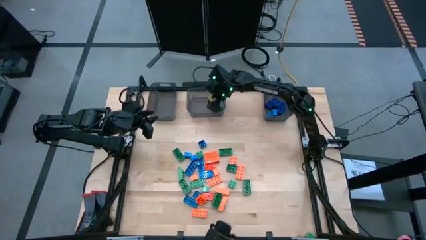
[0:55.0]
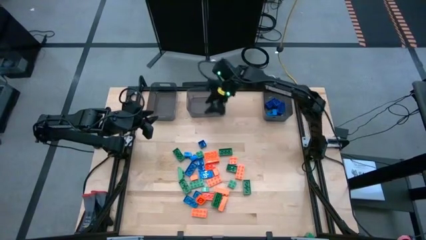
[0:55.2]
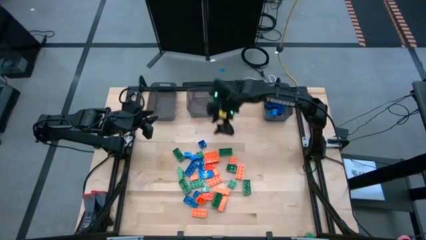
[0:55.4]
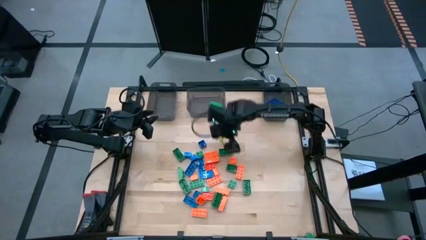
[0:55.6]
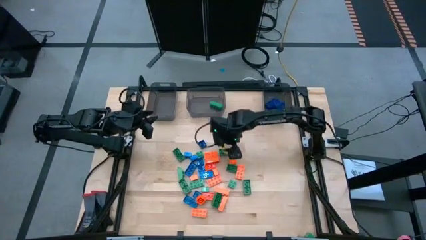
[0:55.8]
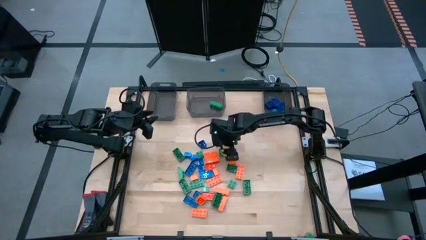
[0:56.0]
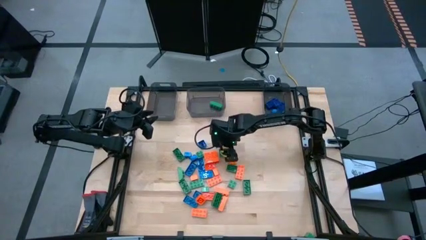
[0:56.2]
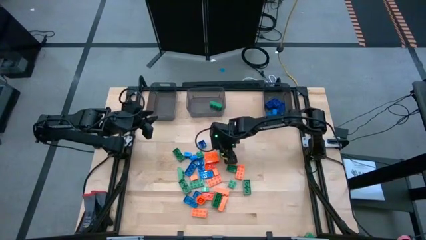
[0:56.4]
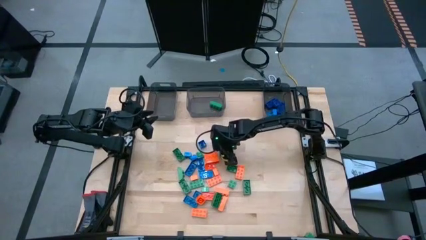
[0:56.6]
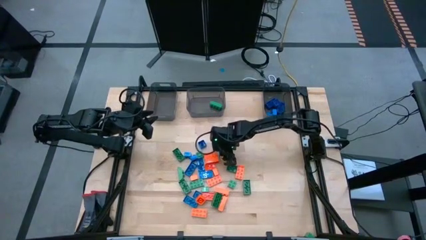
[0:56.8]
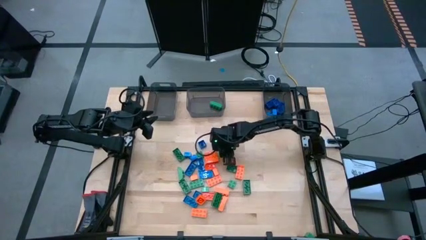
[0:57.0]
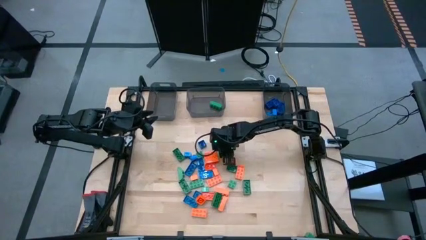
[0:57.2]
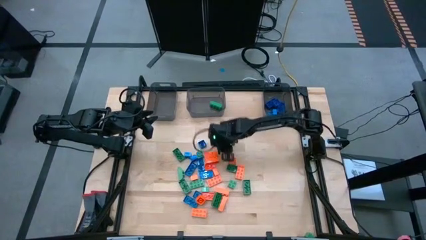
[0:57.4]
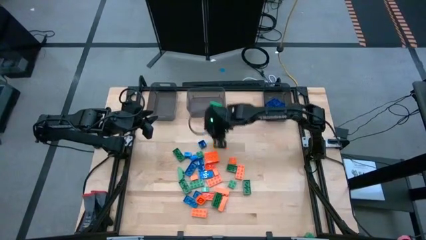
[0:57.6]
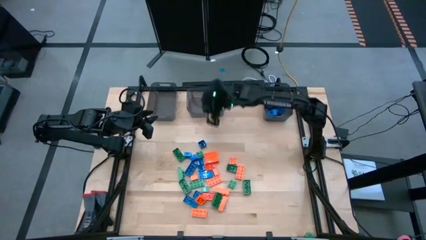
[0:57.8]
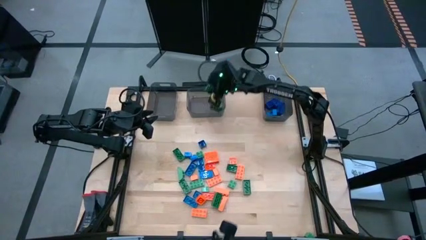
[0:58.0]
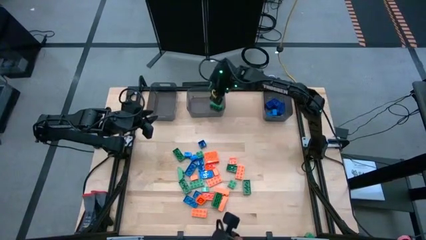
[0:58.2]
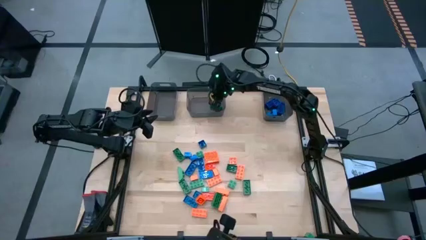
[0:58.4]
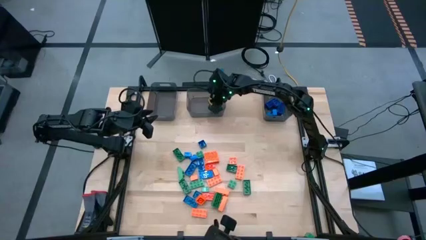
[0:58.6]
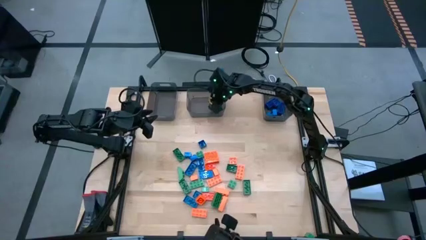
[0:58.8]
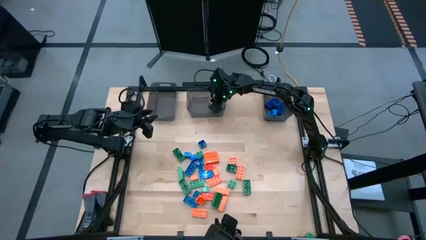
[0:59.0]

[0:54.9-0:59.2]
Task: Sort blocks
Put the green piece into the middle black bin

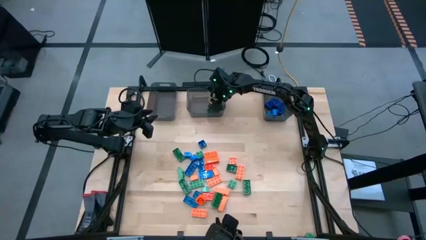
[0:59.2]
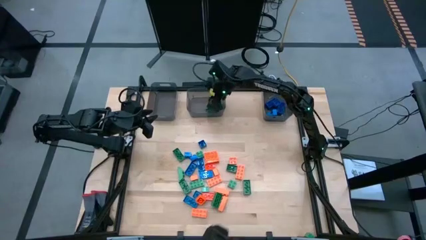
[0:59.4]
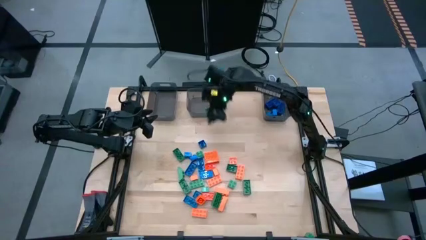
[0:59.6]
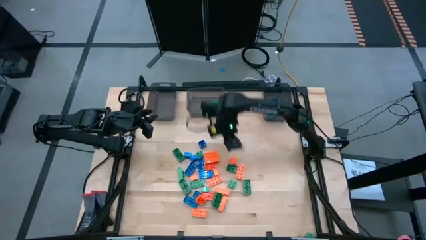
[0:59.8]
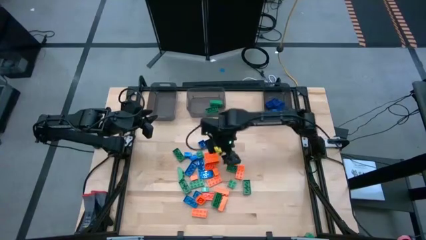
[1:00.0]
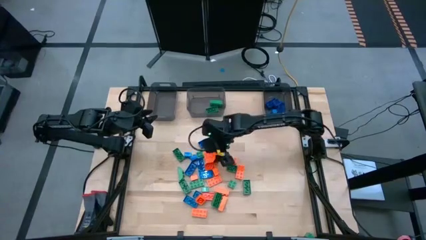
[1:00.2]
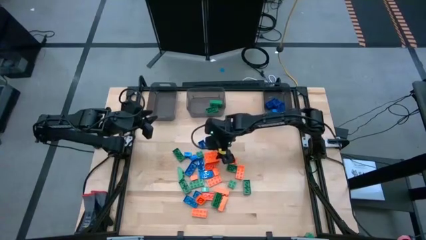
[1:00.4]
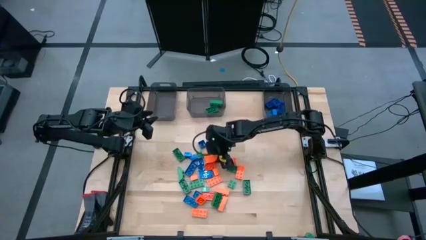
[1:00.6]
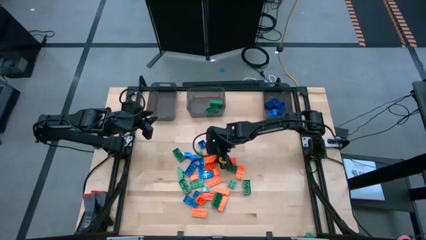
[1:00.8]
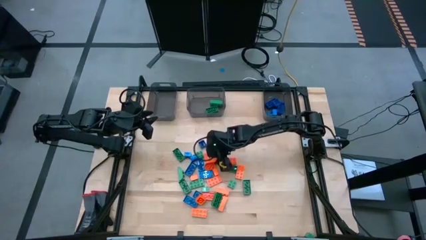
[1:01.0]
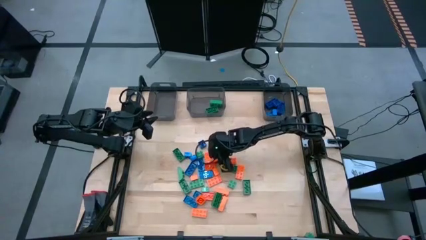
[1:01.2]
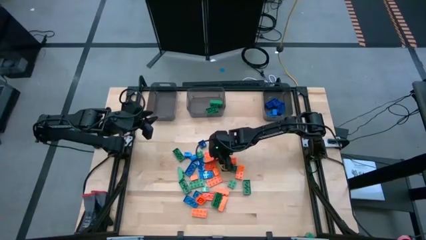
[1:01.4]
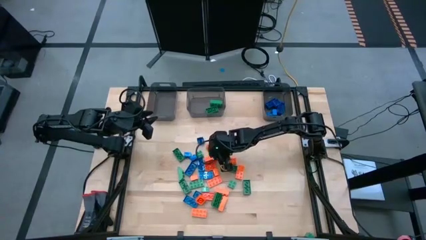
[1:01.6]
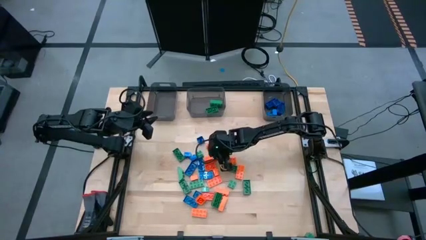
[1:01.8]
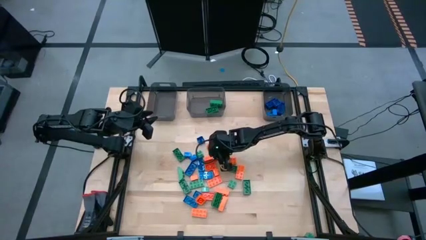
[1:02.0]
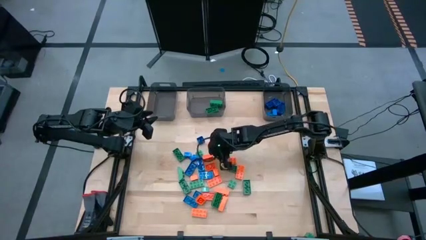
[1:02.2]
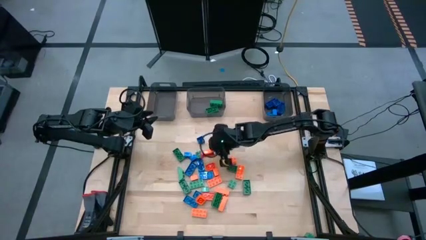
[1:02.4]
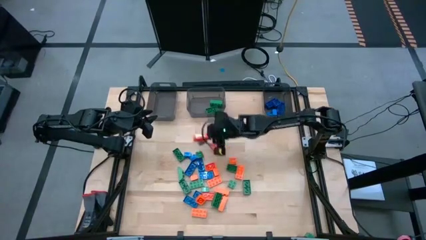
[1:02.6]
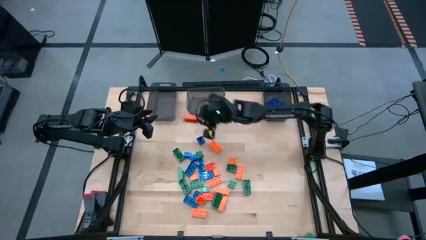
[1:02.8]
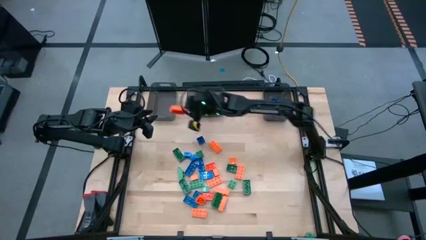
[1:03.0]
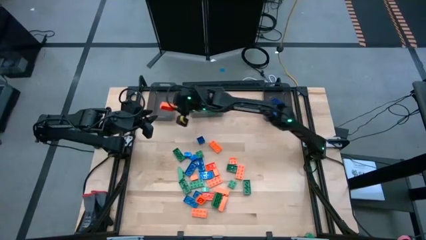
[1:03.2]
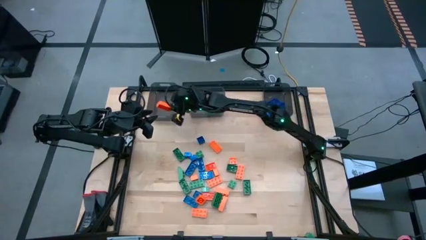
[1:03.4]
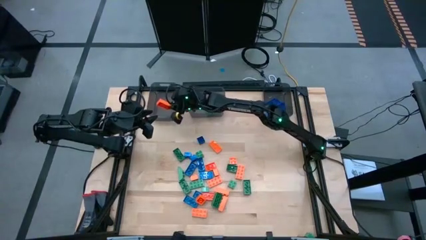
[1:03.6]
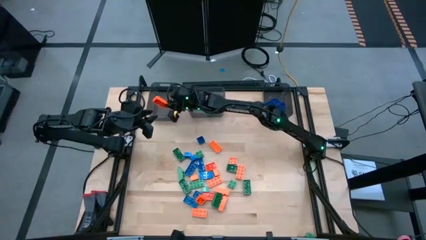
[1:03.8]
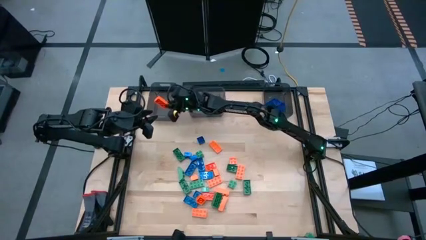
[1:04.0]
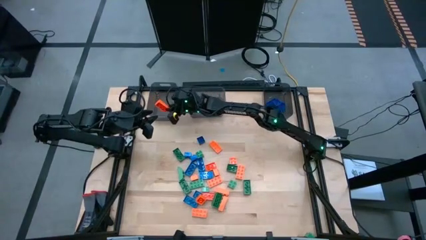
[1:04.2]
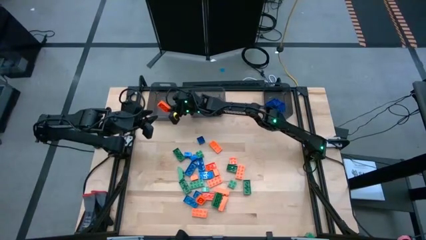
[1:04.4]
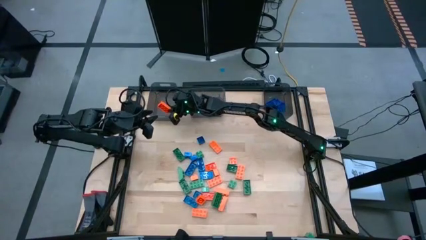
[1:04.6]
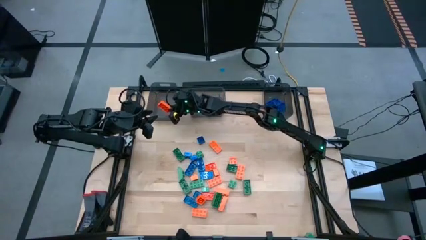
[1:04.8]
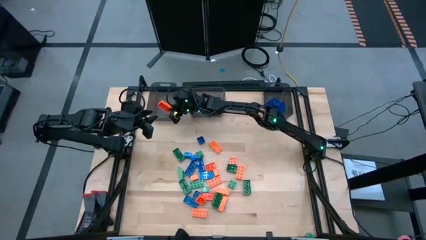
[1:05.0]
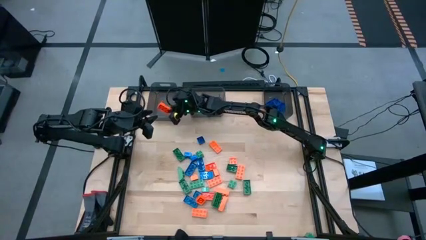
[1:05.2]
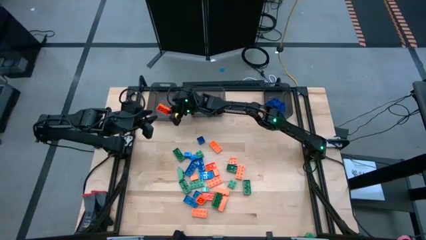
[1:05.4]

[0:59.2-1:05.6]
Put the orange game piece into the left black bin

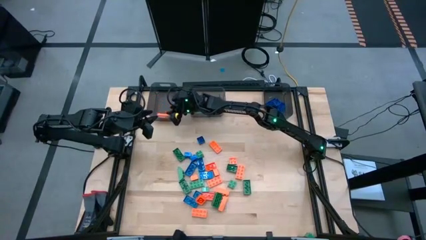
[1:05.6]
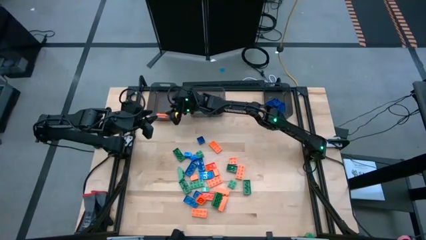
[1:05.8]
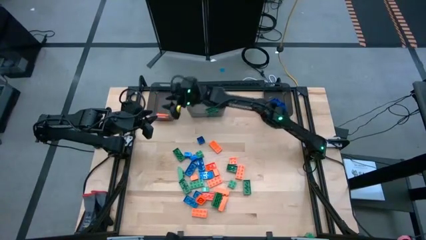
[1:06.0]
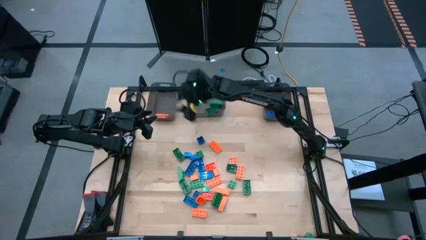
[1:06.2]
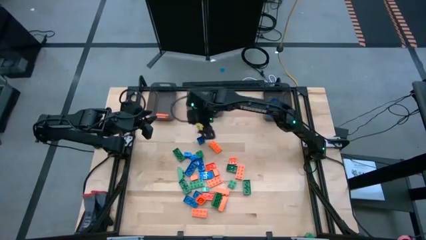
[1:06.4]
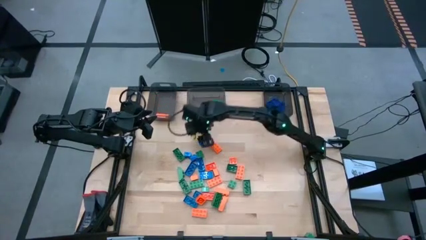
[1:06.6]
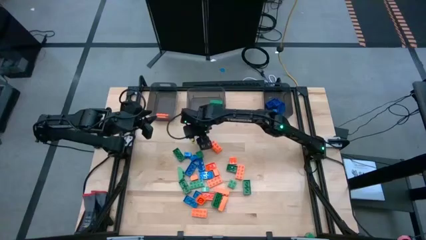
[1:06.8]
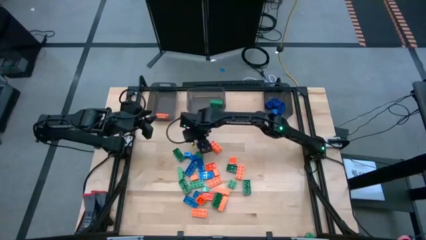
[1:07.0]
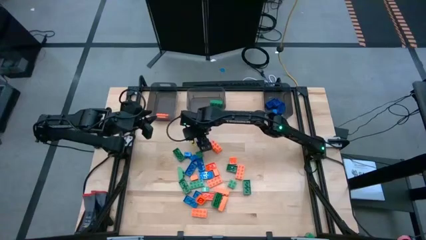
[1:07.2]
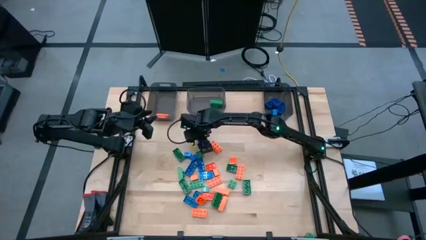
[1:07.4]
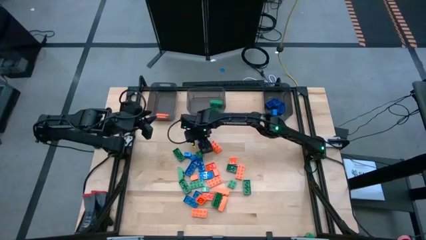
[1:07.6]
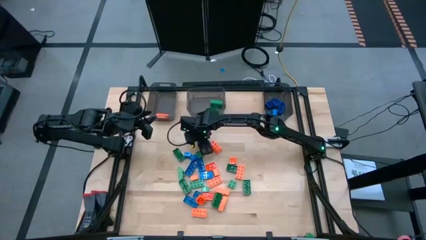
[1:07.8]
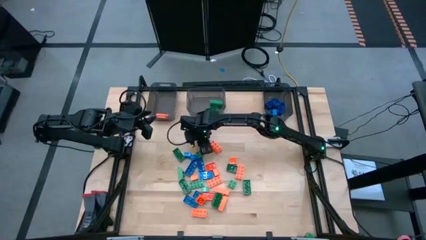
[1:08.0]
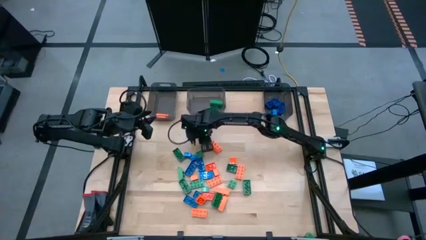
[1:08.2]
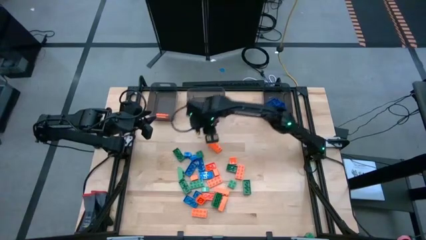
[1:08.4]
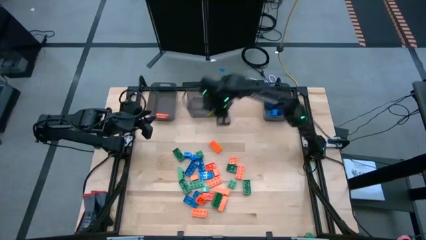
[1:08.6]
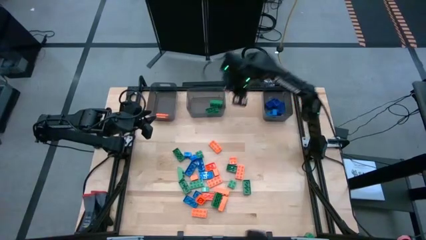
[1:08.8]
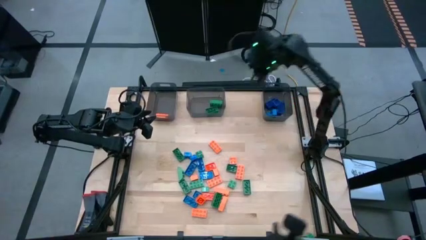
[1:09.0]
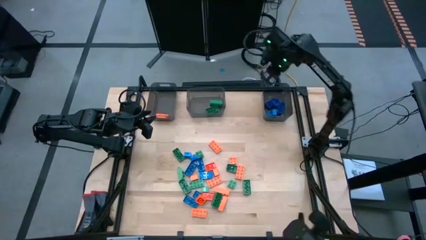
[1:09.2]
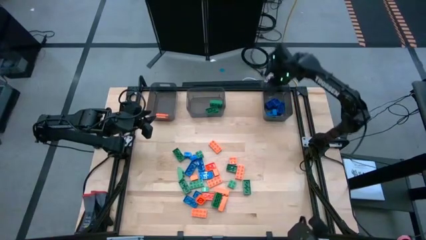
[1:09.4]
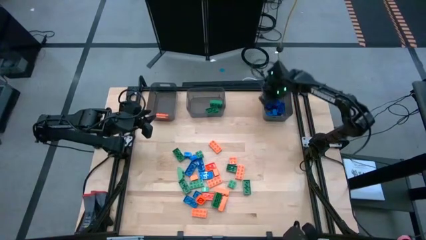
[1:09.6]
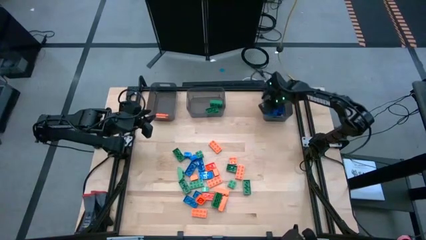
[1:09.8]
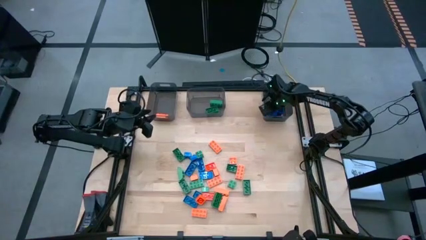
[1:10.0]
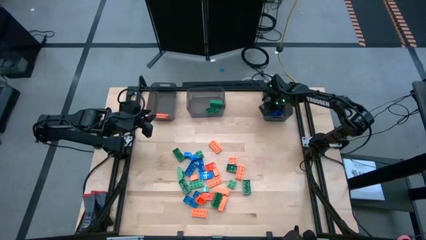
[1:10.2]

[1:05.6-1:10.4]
Put the blue game piece into the right black bin

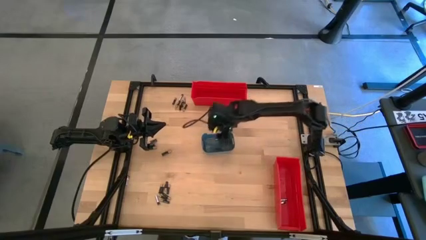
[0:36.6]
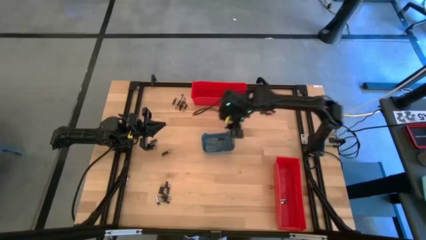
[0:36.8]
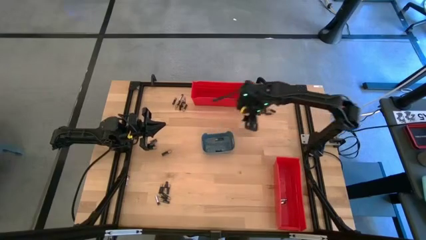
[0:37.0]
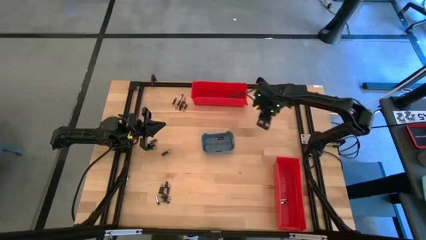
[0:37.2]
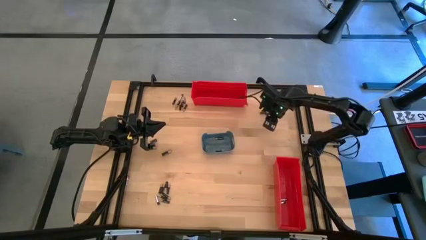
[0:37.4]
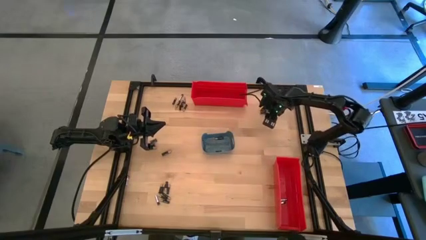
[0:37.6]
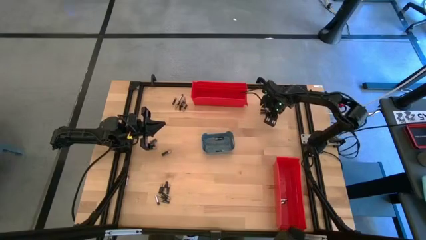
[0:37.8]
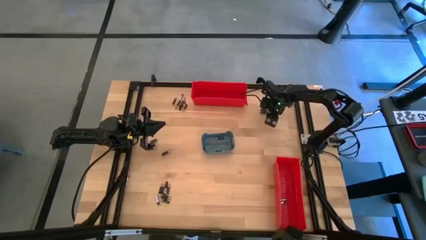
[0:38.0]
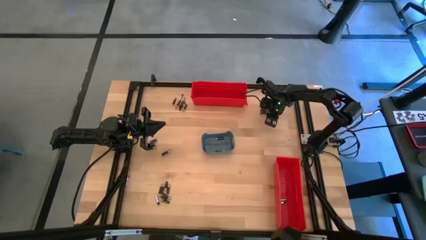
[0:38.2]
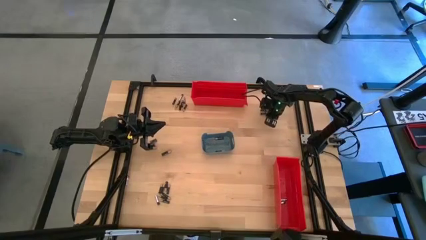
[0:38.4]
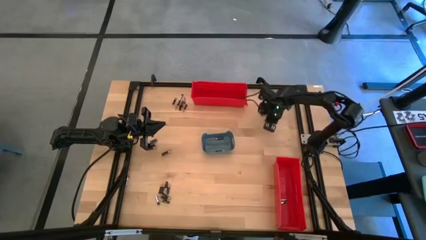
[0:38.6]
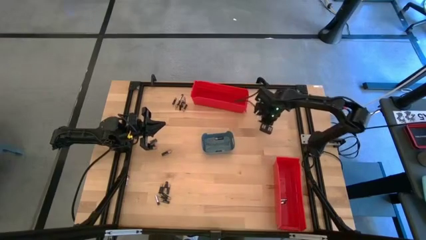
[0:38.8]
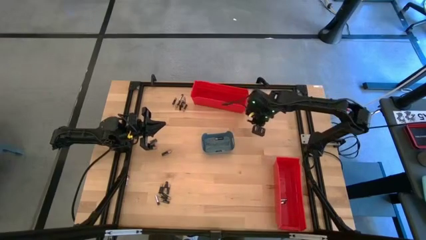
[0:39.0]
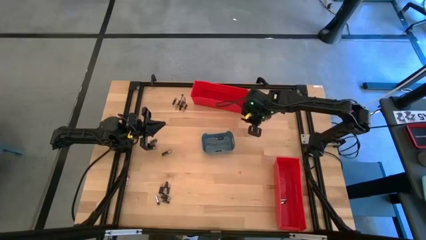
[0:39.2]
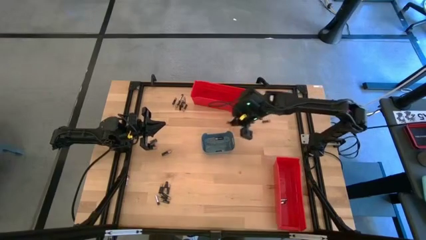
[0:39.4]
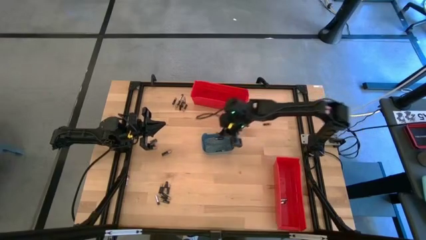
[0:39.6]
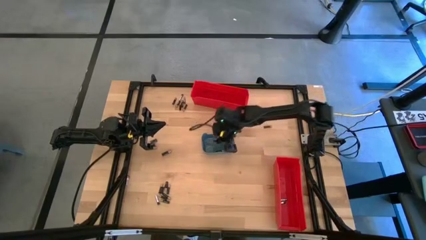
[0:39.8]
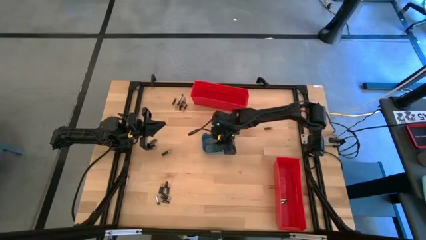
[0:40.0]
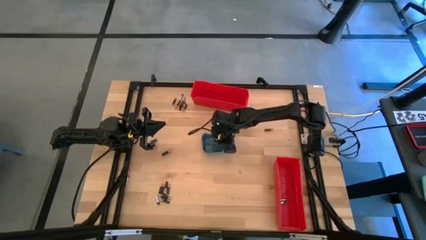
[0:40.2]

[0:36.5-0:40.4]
Task: Sort batteries
Put the black battery into the blue bin
